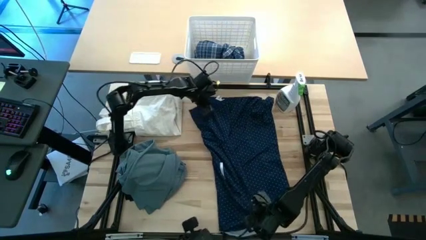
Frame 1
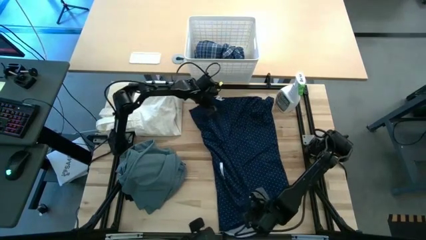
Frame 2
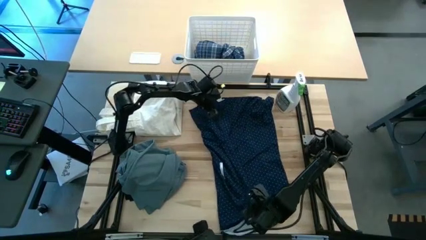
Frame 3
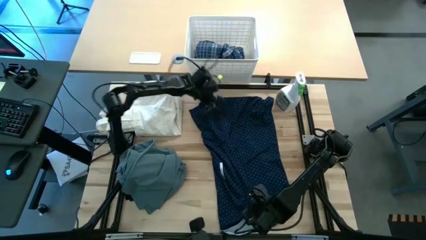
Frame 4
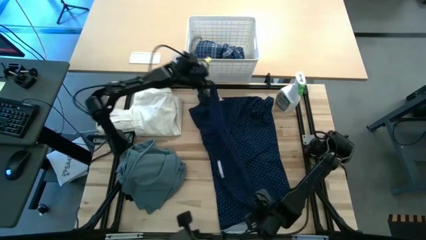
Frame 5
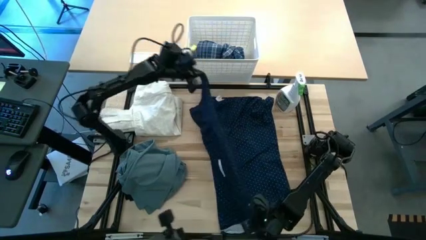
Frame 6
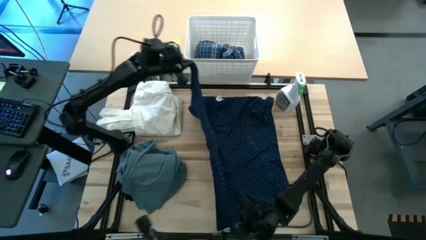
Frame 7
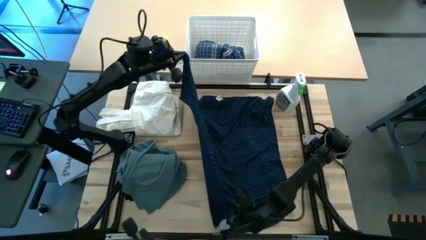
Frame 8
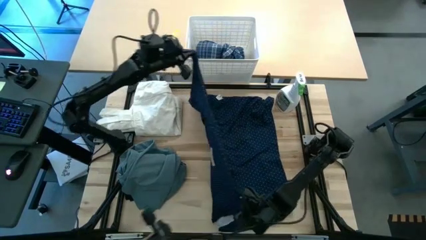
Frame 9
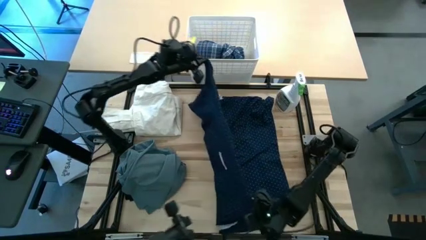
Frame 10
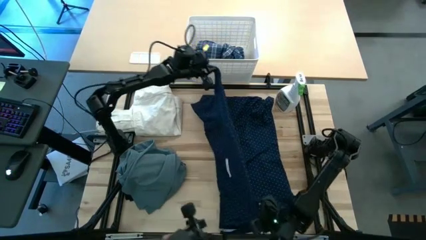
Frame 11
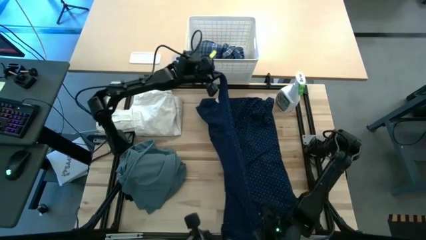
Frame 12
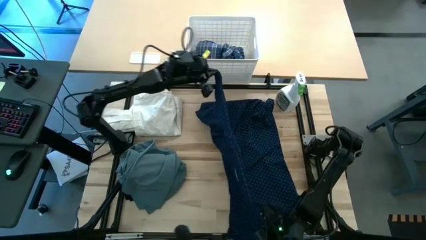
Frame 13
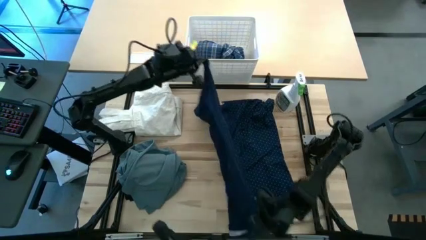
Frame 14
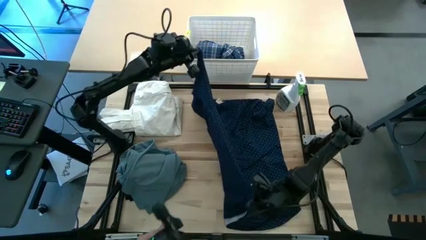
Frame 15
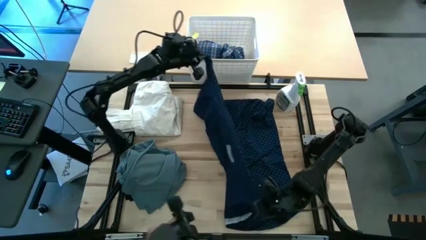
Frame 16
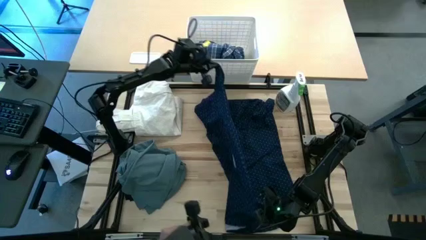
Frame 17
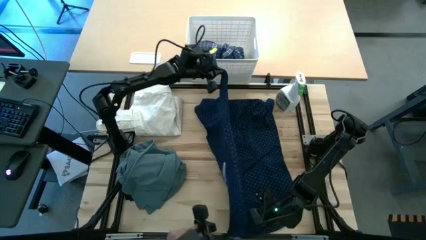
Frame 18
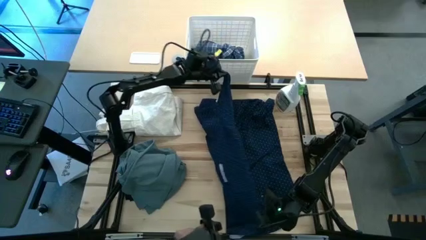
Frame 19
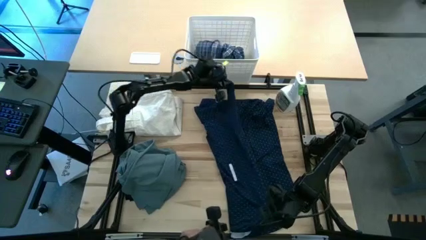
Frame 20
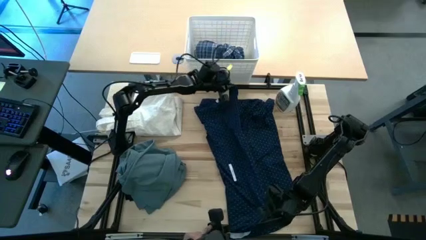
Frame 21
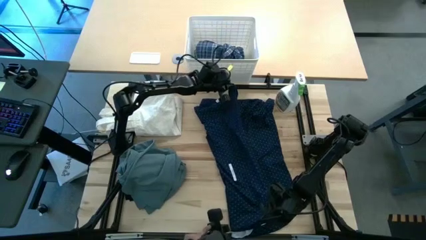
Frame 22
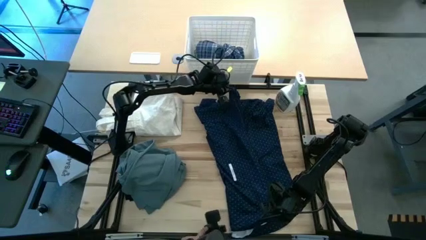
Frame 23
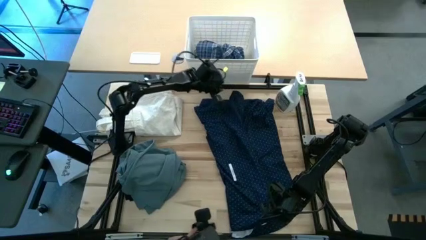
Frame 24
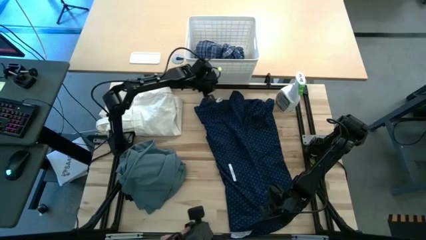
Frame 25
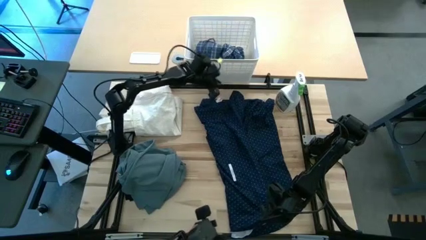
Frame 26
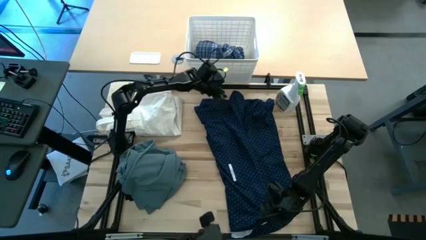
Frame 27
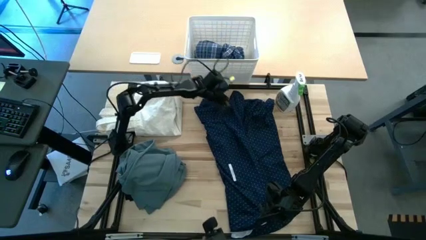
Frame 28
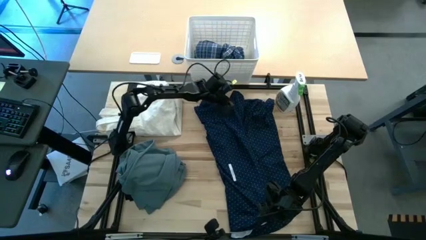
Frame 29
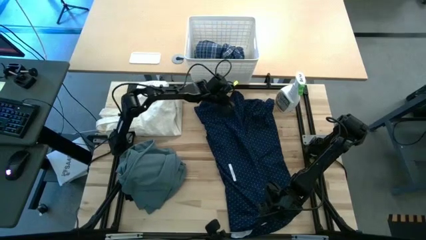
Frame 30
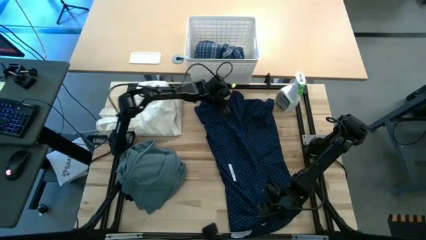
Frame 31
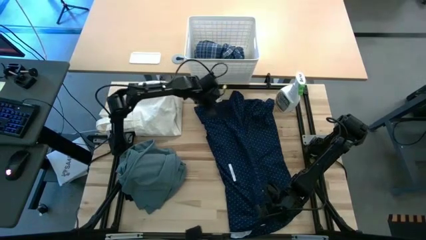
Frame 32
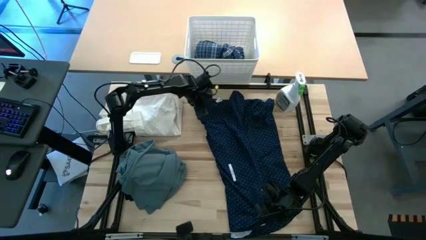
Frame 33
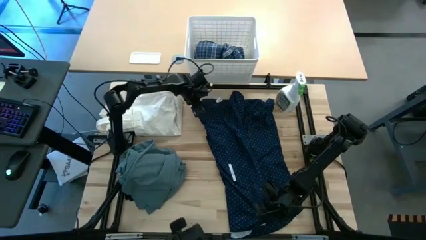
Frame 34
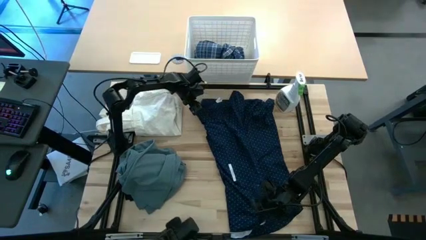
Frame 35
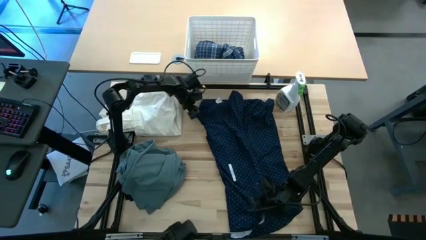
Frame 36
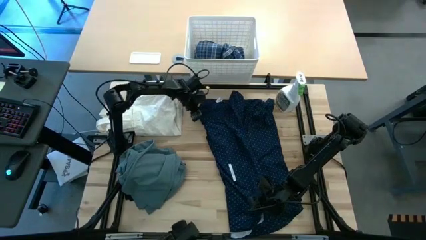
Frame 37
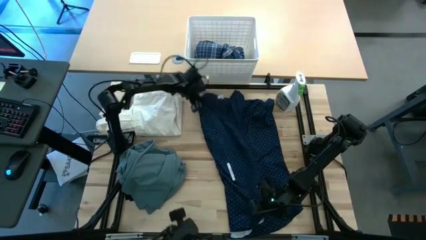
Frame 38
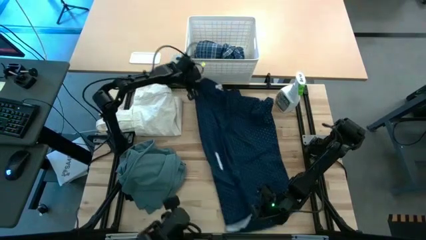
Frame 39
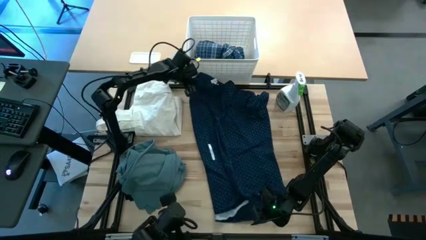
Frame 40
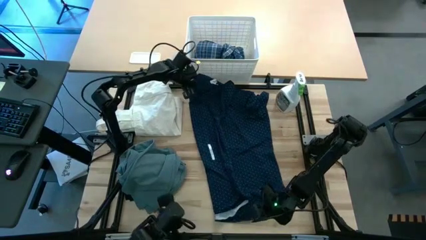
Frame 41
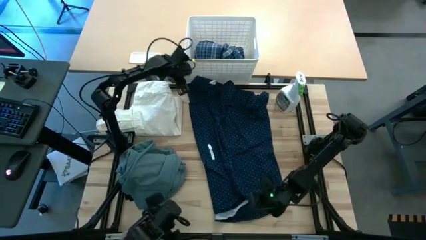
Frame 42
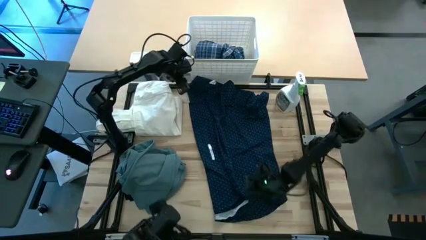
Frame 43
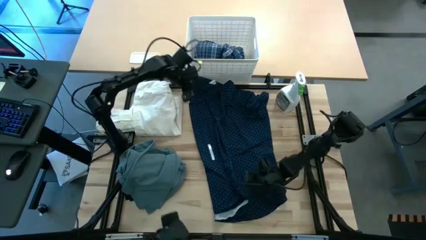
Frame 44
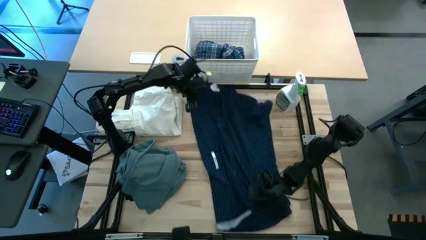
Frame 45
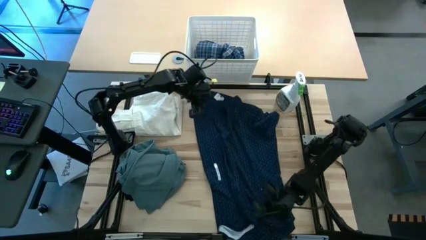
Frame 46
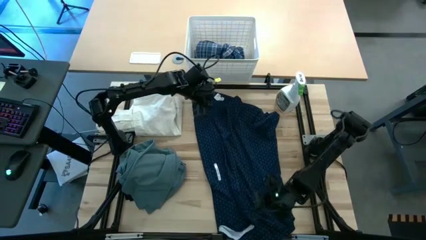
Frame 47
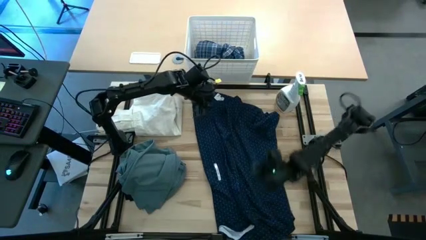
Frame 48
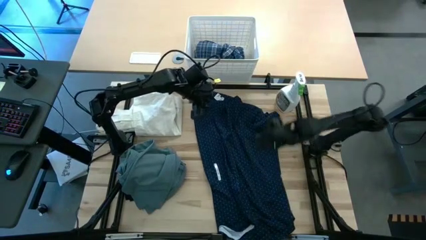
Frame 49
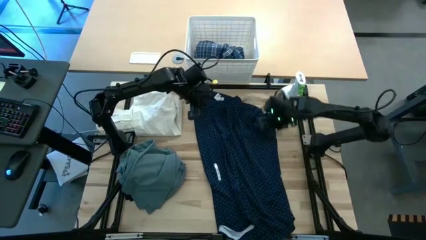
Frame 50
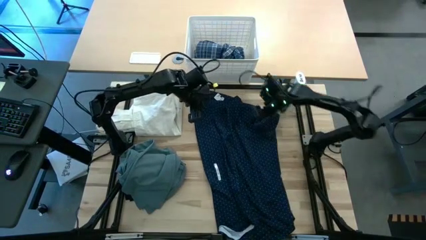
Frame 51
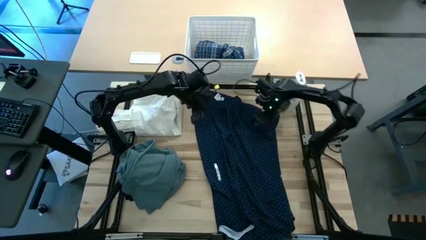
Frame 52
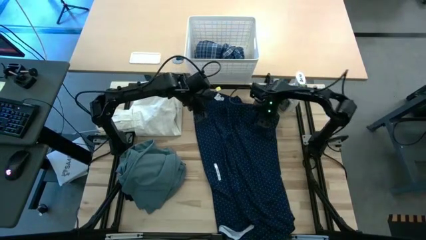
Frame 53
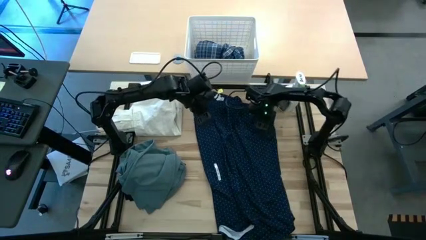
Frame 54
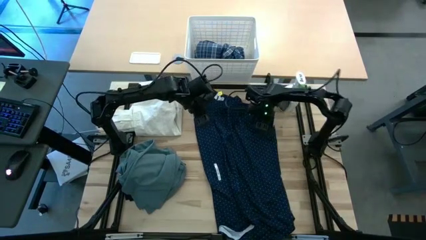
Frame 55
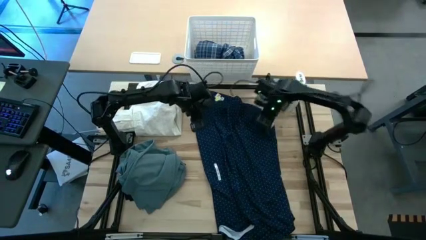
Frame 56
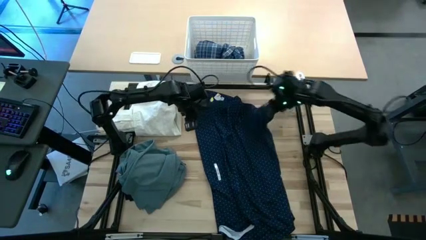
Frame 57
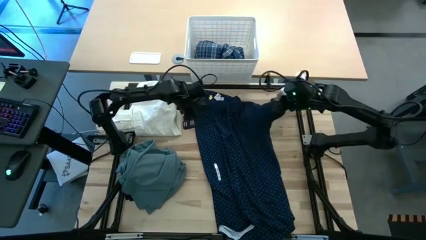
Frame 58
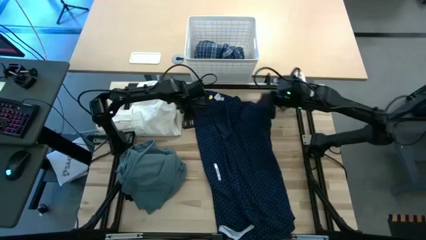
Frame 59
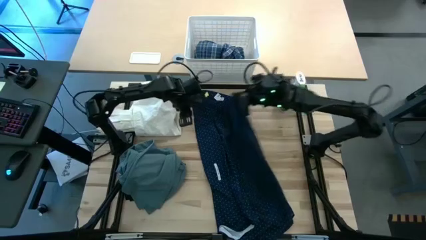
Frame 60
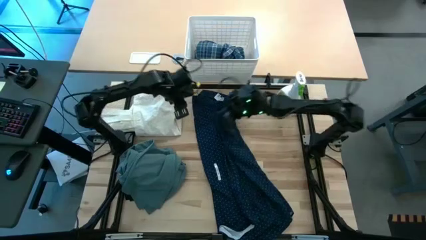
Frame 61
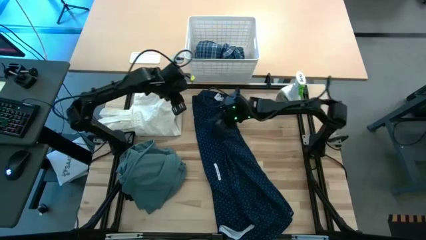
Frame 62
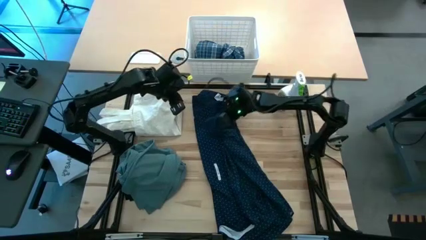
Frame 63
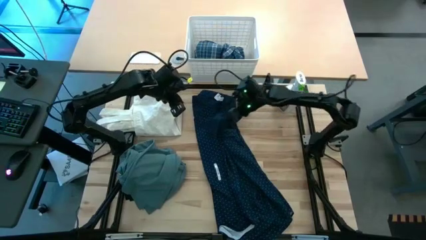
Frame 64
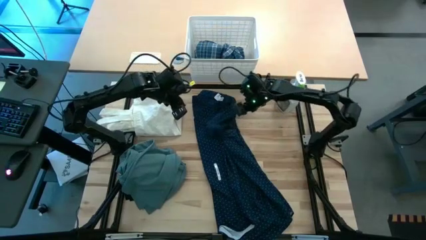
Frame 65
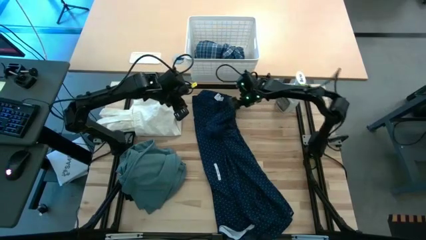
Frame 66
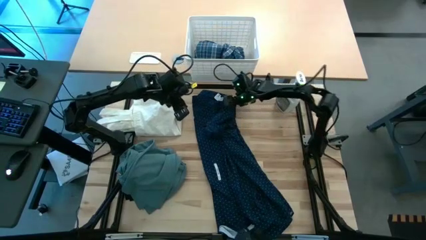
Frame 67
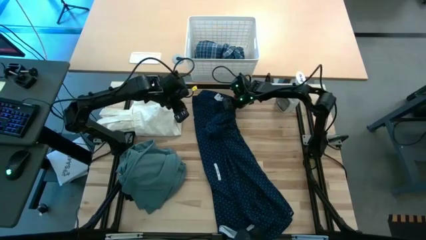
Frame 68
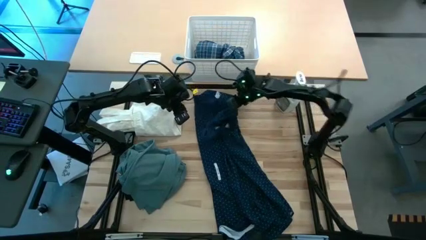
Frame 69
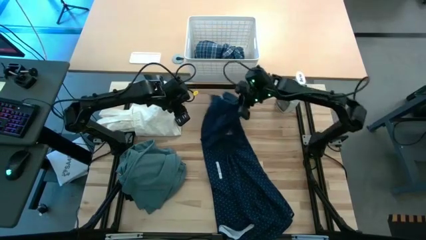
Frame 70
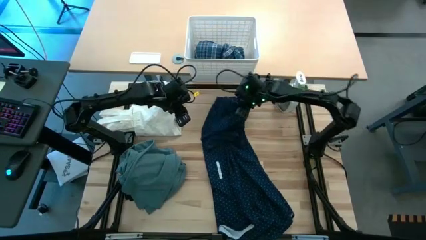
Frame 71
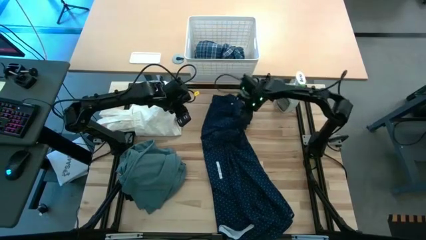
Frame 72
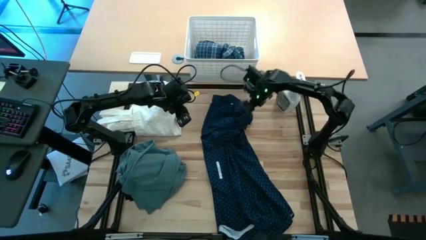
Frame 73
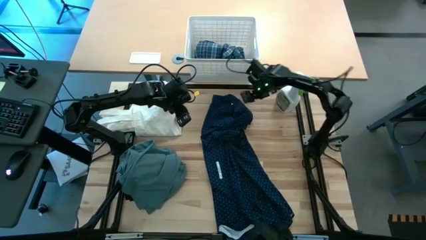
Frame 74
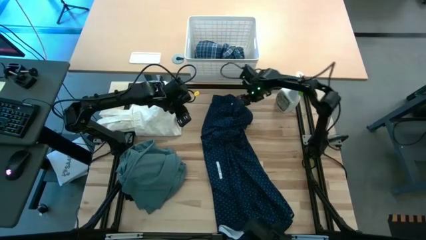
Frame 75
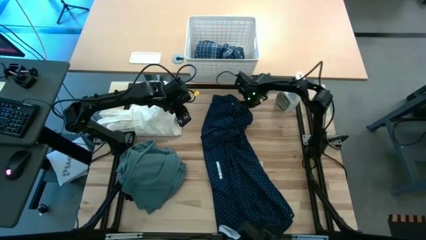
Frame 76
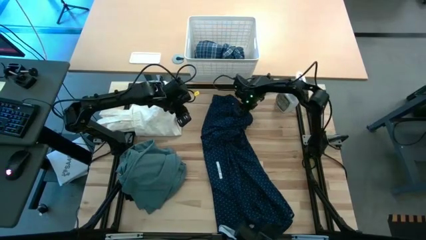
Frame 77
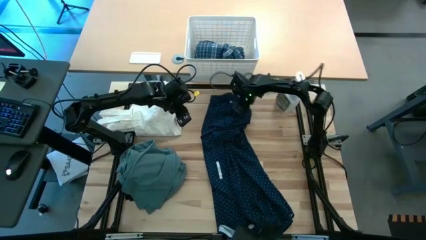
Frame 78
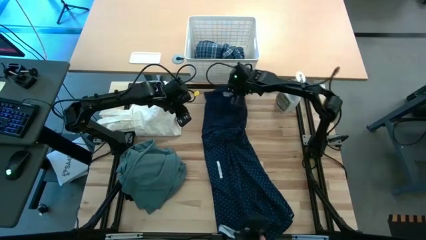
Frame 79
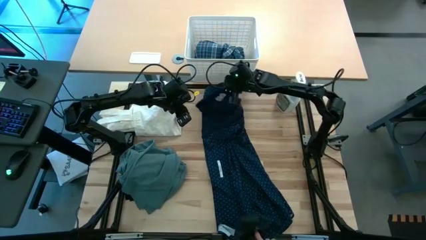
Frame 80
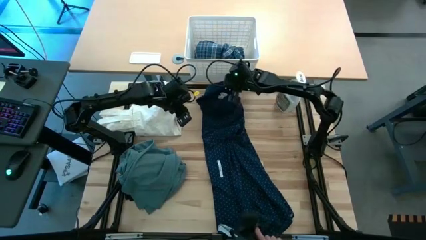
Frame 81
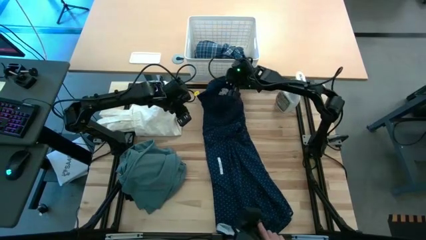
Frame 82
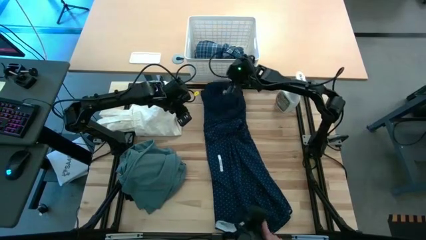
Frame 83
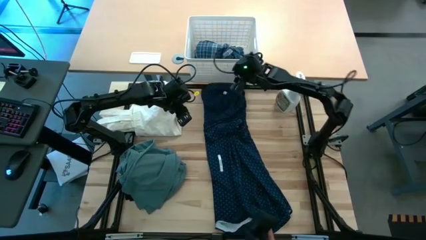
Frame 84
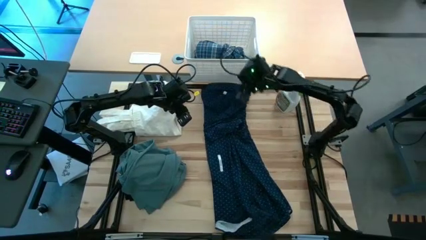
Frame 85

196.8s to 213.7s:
Fold the dark blue polo
